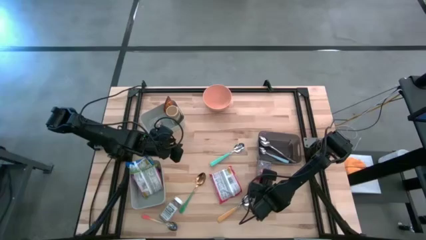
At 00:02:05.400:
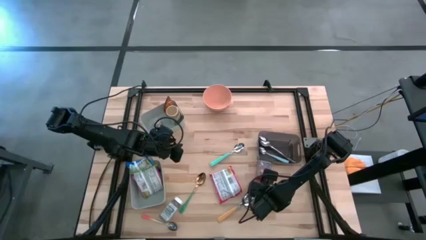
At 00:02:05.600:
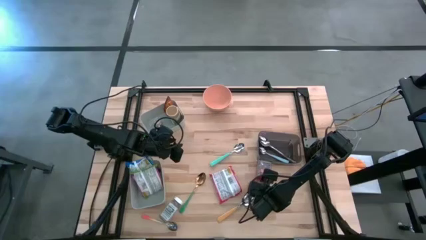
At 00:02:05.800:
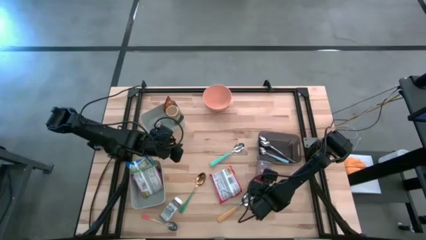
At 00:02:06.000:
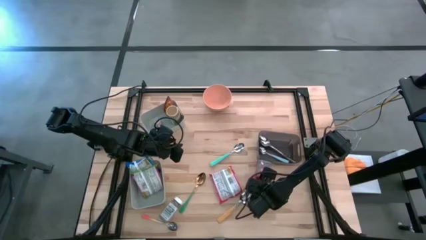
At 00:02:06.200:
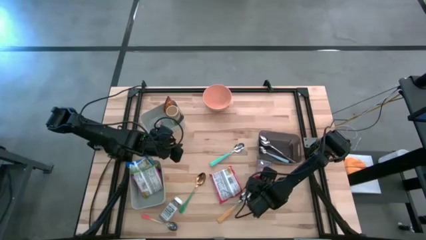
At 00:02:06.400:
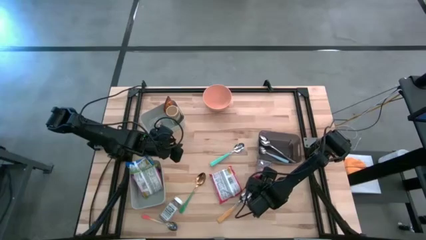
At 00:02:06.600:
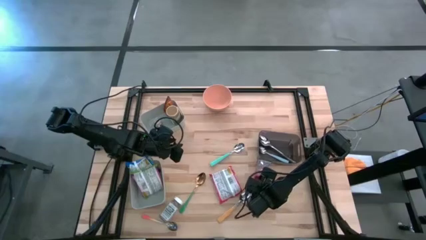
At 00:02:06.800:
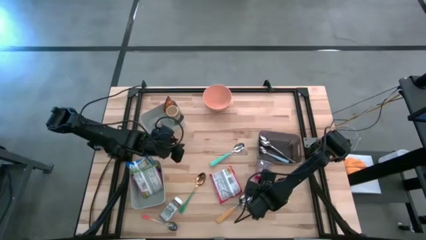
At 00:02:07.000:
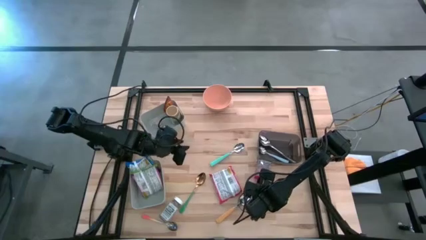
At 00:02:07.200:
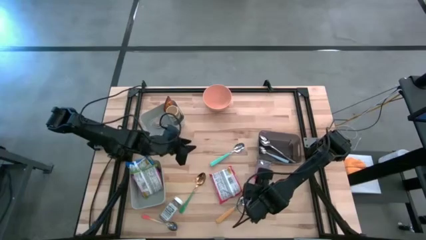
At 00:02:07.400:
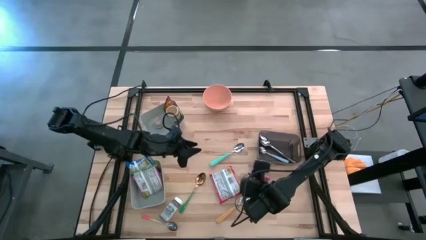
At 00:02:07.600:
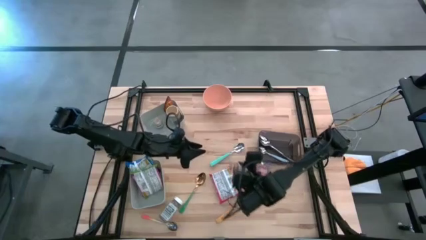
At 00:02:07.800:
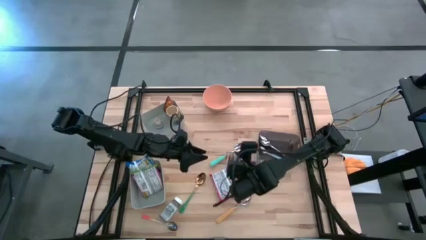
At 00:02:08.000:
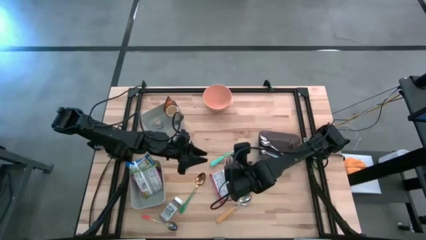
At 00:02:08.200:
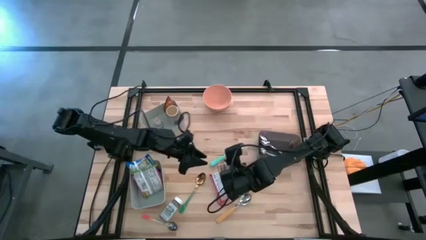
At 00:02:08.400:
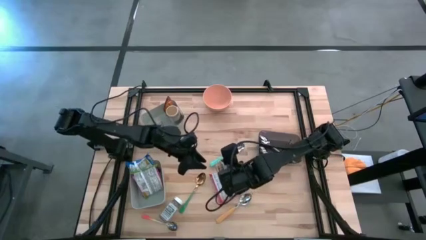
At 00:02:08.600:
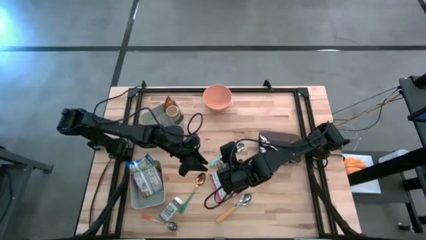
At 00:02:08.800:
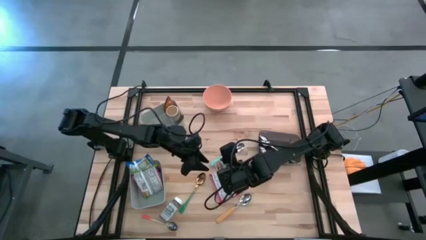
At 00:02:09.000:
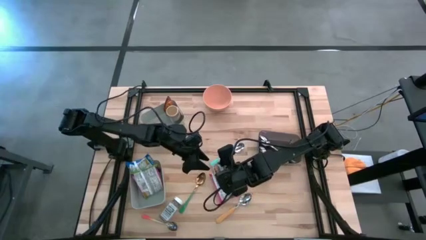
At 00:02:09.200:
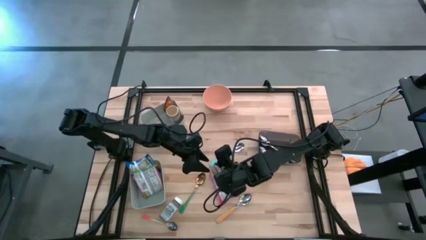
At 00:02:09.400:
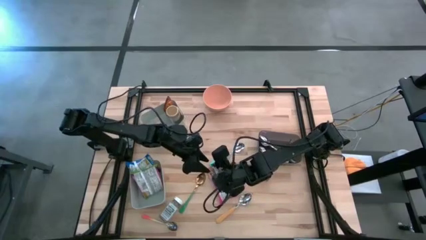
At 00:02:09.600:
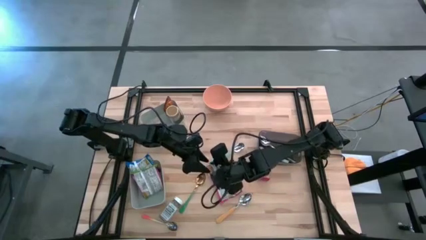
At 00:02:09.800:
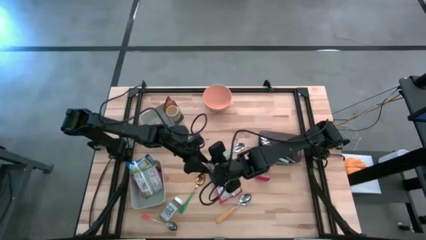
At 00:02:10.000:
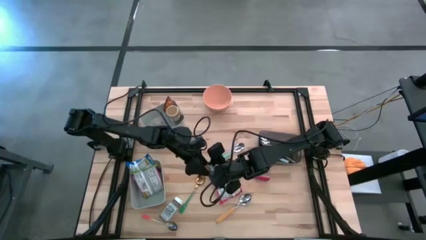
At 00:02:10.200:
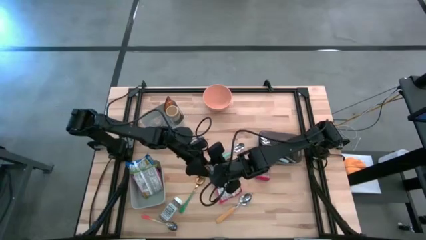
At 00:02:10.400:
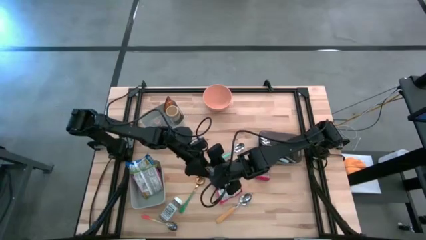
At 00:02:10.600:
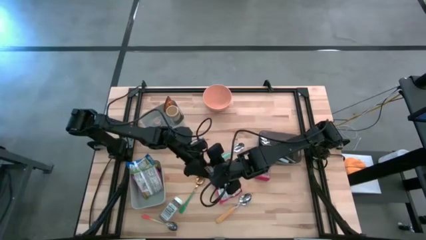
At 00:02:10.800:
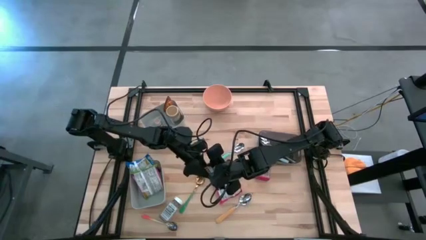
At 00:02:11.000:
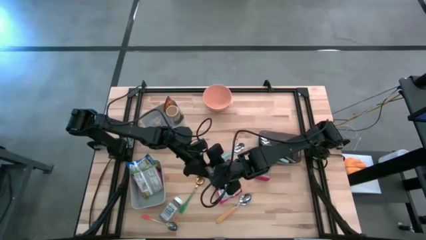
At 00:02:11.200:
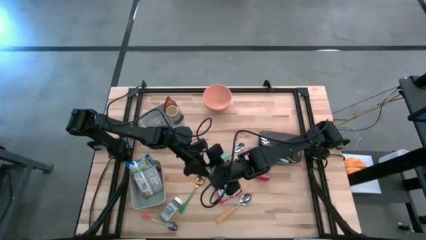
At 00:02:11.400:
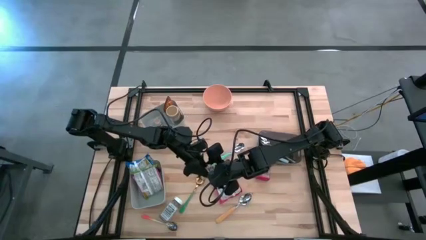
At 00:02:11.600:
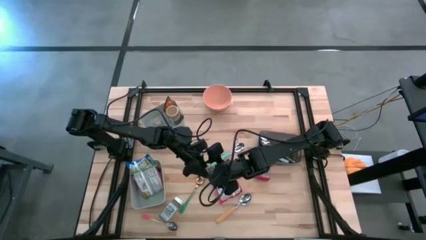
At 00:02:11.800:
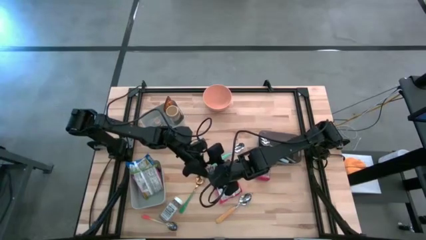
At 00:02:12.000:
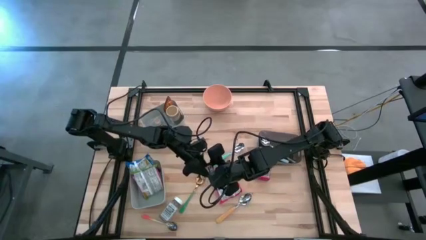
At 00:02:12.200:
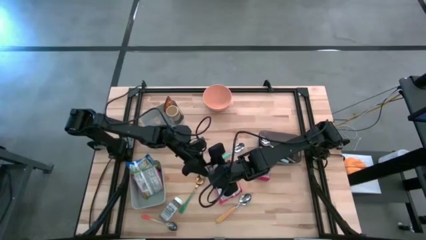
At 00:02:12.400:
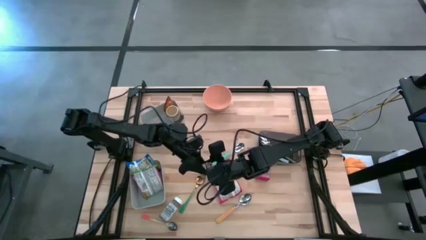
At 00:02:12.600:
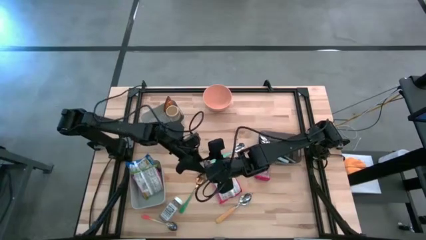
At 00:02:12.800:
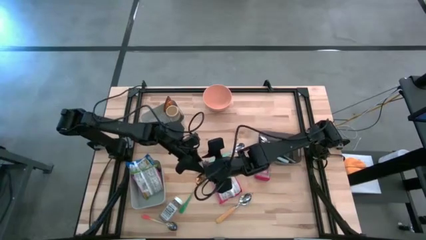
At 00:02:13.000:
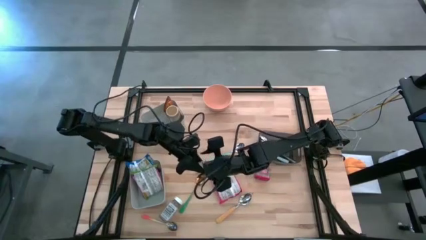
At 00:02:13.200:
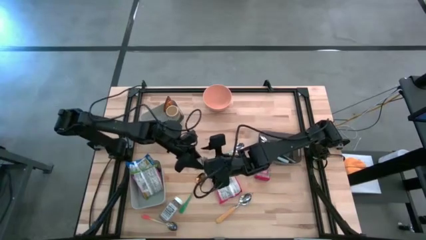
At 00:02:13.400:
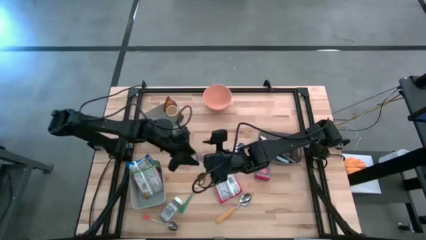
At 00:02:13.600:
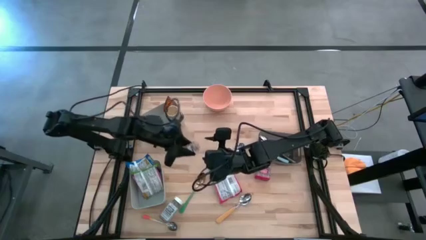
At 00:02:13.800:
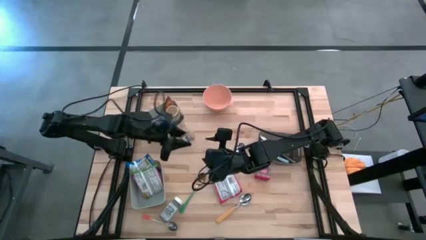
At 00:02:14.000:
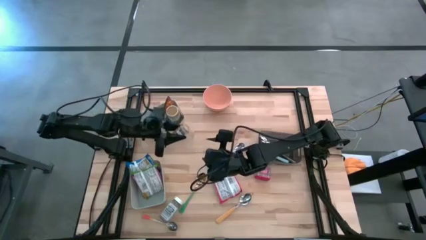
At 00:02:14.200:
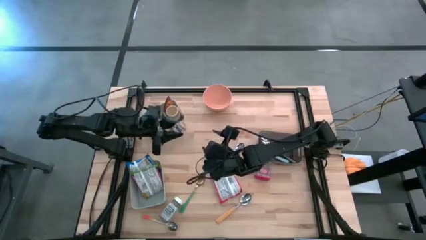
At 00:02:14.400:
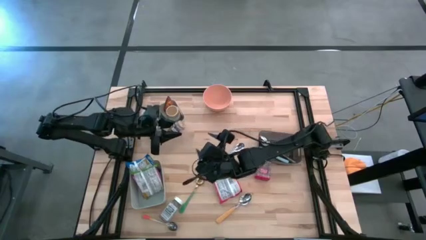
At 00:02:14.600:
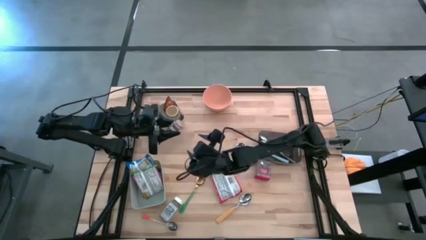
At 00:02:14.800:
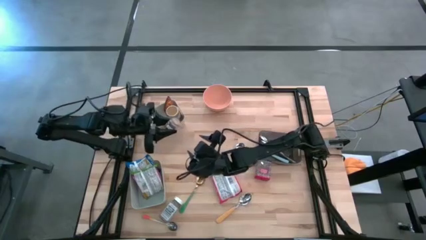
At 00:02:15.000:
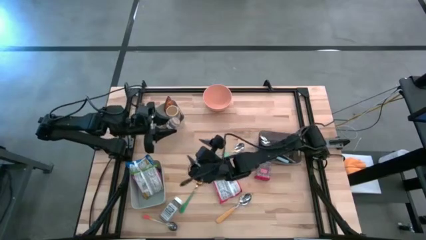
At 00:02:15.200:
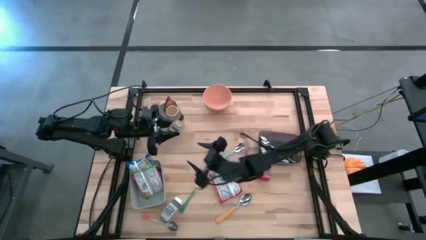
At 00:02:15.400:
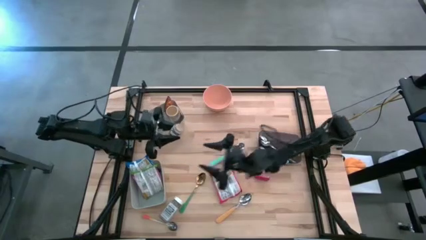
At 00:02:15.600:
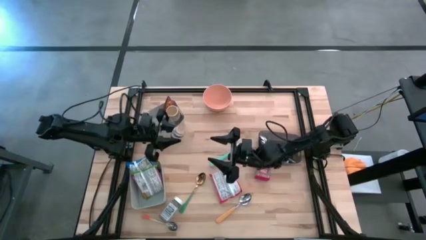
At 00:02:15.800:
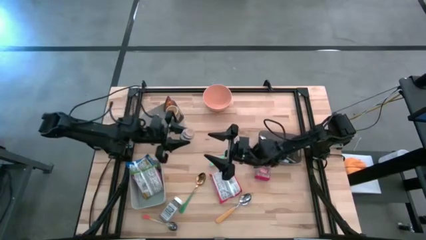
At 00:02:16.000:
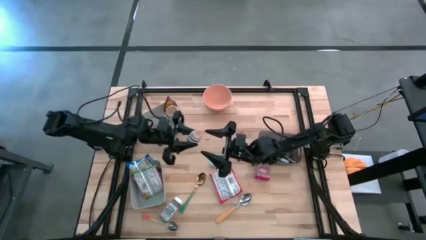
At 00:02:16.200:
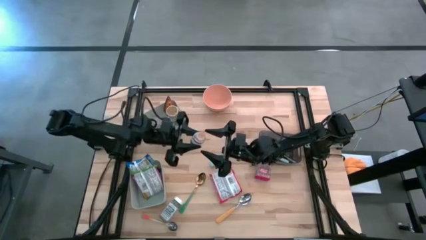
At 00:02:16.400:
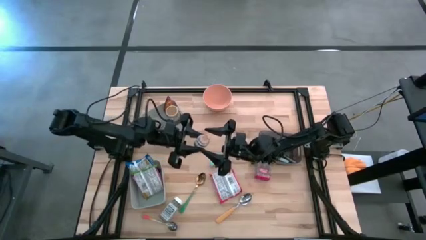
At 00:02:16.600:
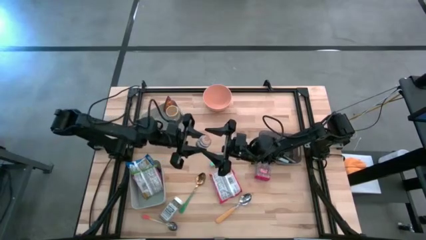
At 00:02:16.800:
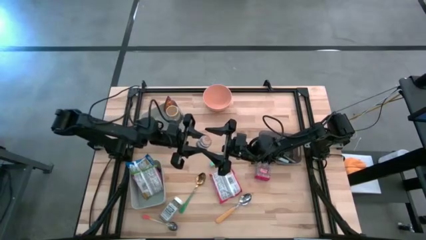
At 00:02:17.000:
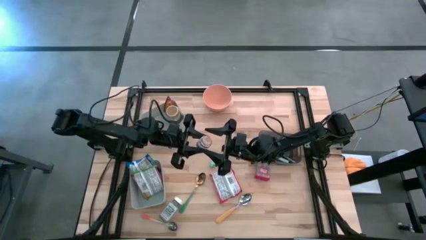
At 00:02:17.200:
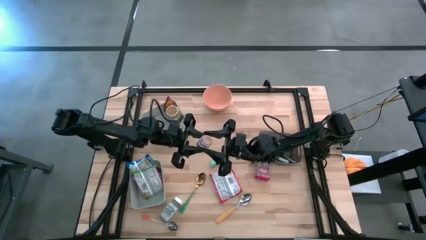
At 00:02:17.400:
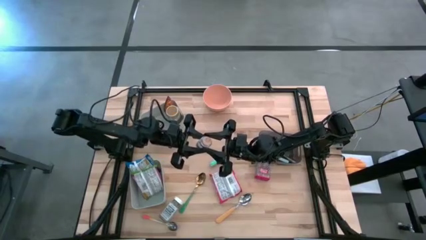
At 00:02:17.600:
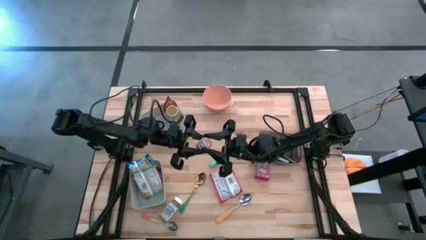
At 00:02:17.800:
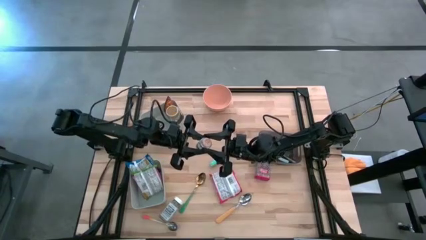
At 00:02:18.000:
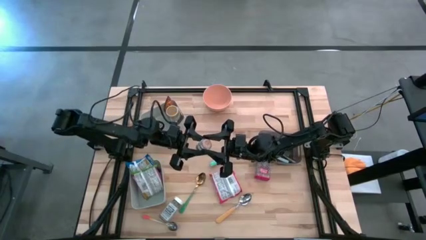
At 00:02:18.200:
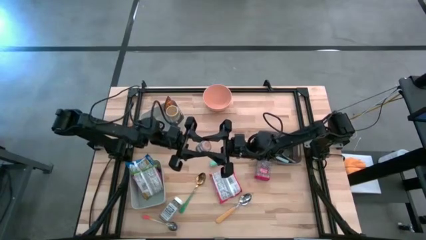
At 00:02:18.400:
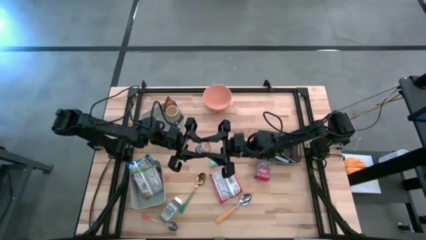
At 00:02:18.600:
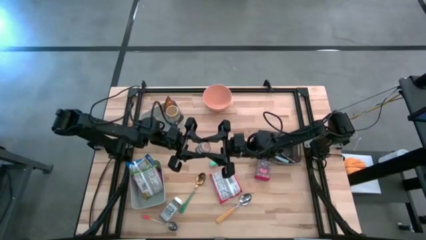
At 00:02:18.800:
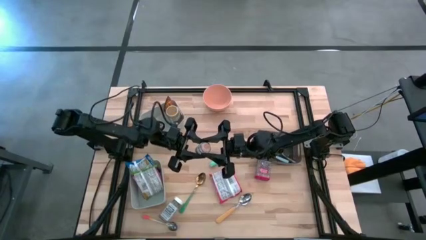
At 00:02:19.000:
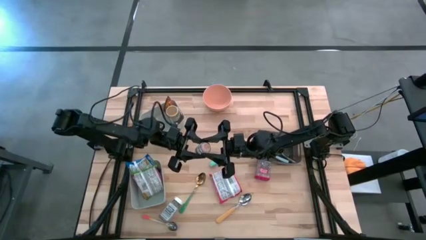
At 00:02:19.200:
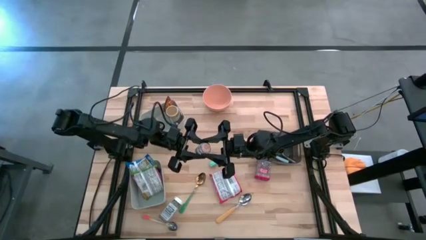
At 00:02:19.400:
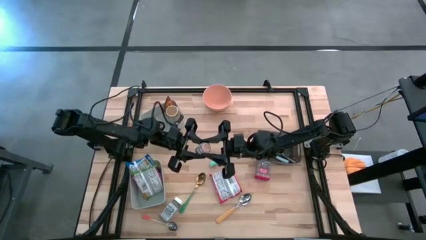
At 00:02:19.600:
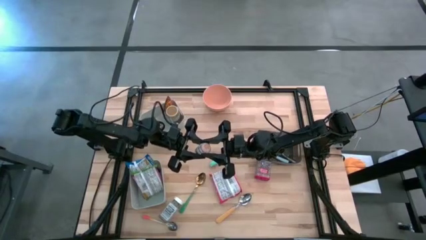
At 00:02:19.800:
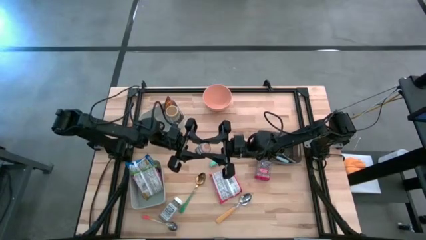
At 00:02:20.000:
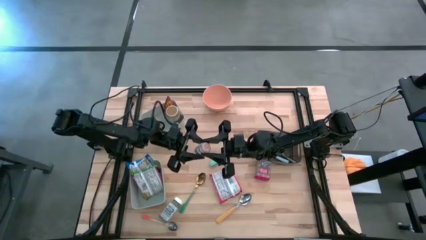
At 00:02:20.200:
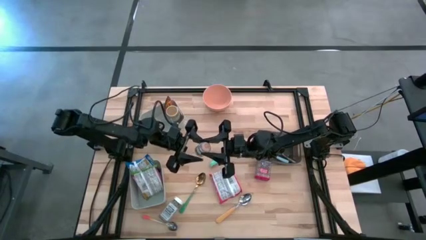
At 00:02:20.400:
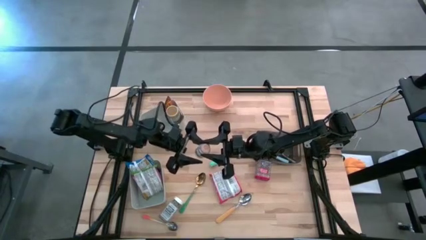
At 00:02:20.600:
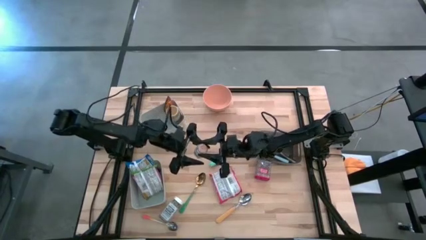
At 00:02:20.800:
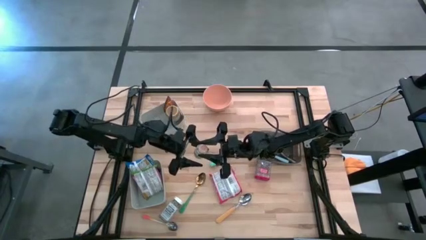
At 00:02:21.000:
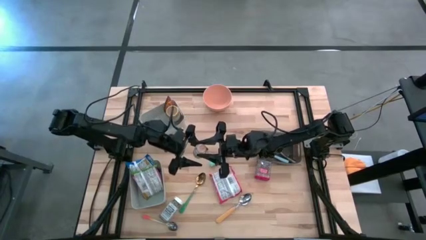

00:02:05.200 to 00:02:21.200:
Put the brown seasoning bottle into the top gray bin
